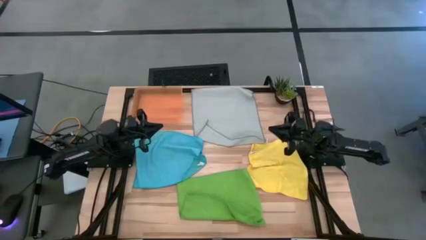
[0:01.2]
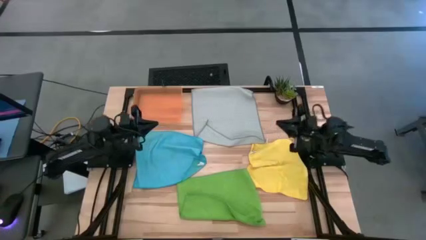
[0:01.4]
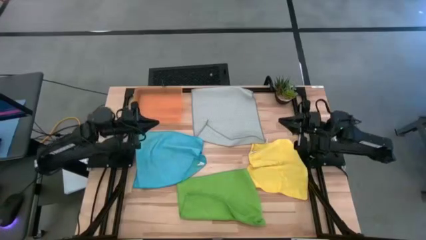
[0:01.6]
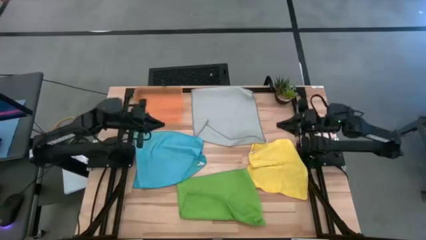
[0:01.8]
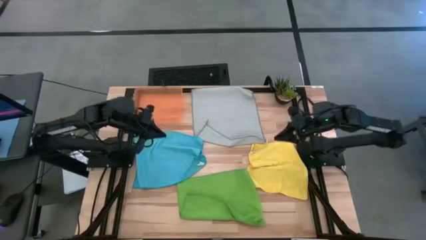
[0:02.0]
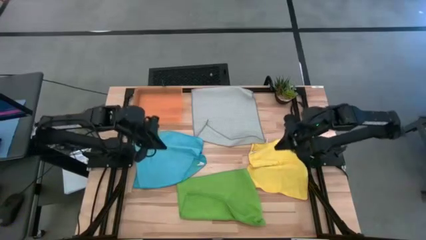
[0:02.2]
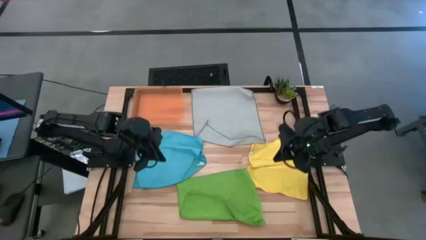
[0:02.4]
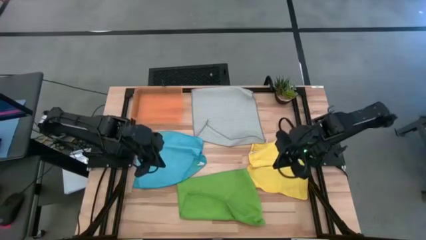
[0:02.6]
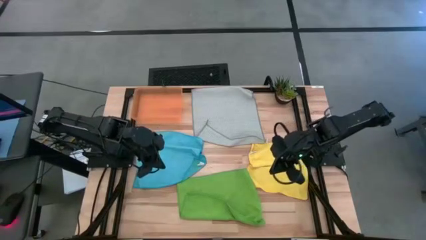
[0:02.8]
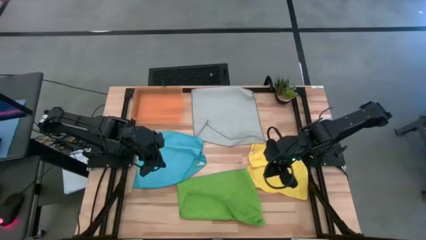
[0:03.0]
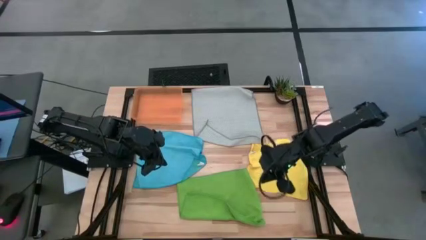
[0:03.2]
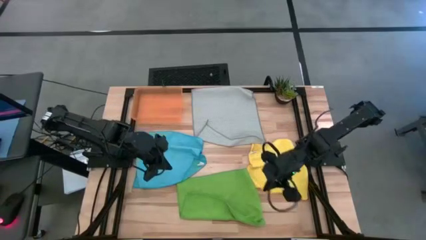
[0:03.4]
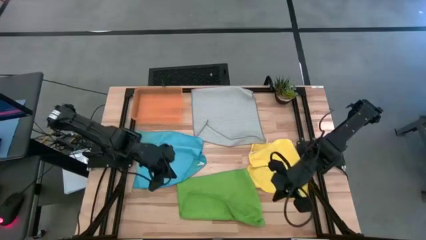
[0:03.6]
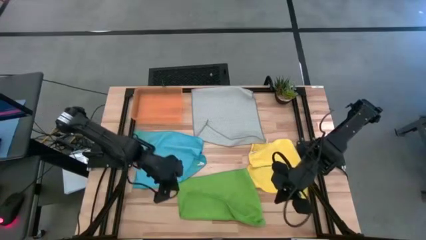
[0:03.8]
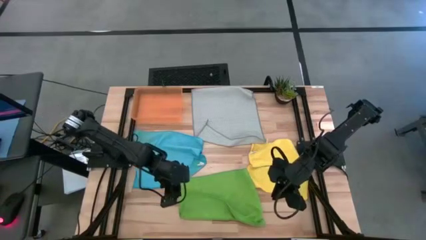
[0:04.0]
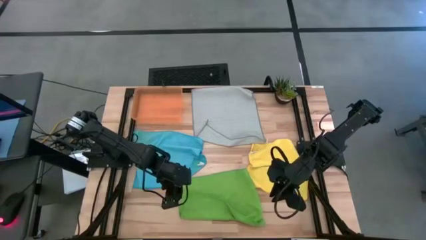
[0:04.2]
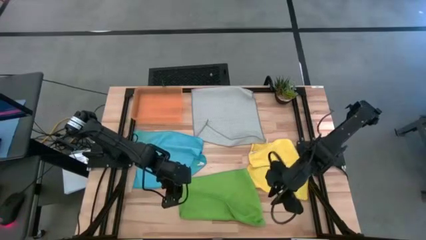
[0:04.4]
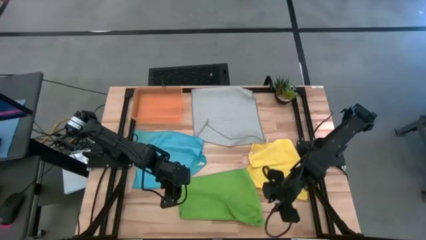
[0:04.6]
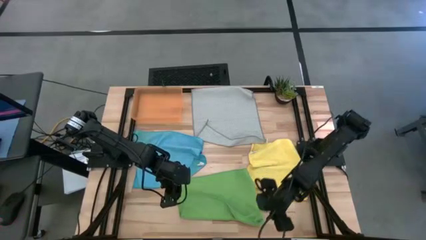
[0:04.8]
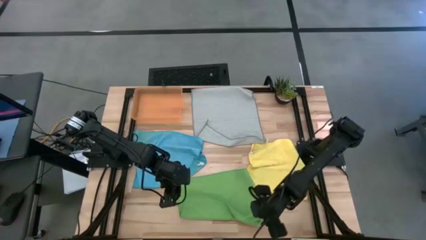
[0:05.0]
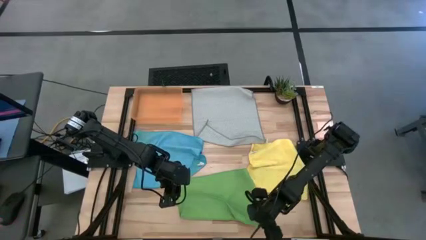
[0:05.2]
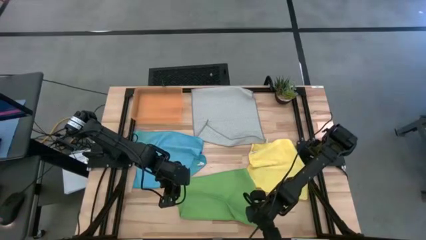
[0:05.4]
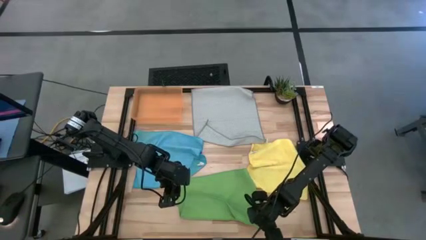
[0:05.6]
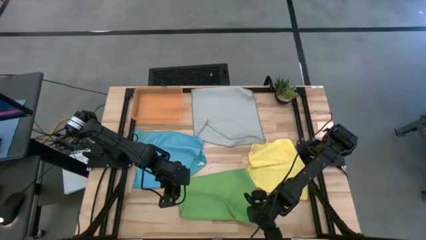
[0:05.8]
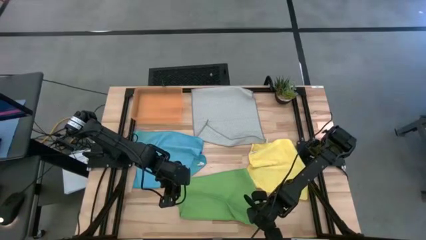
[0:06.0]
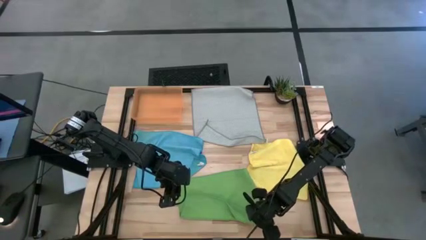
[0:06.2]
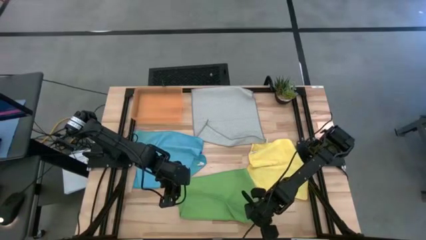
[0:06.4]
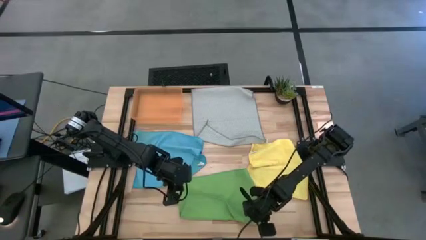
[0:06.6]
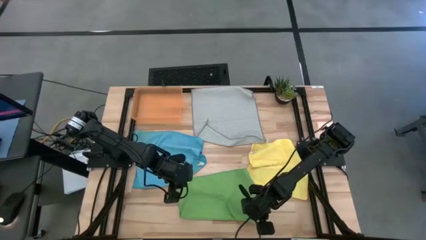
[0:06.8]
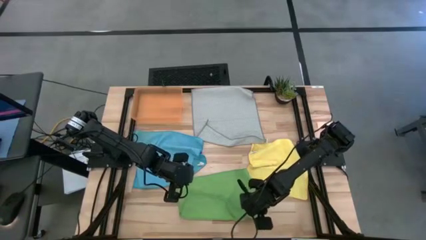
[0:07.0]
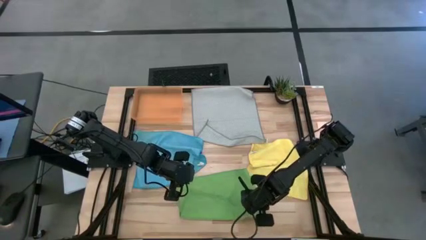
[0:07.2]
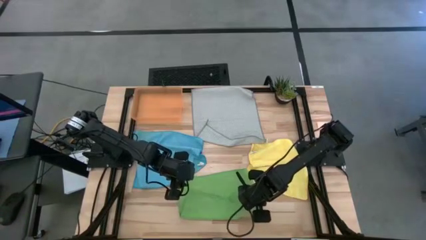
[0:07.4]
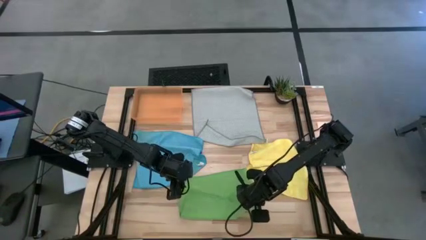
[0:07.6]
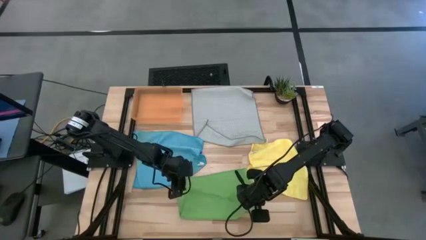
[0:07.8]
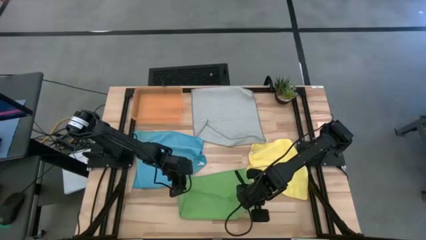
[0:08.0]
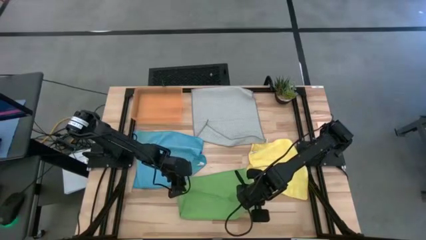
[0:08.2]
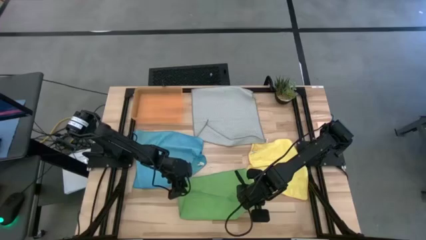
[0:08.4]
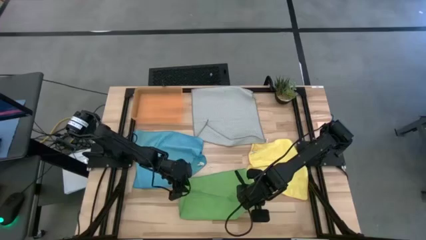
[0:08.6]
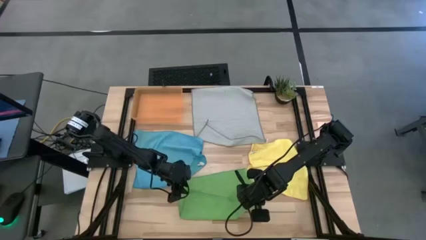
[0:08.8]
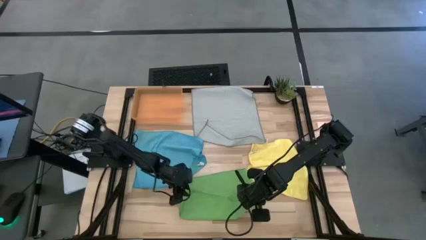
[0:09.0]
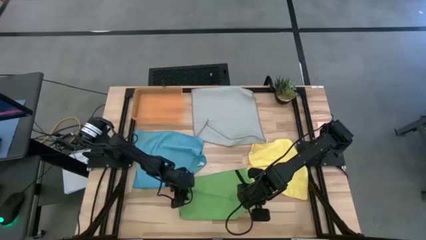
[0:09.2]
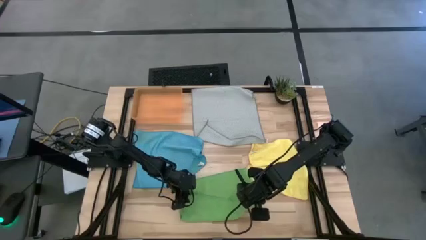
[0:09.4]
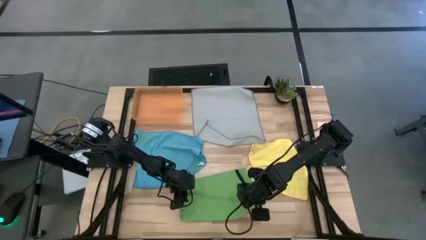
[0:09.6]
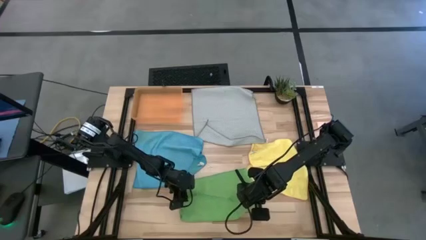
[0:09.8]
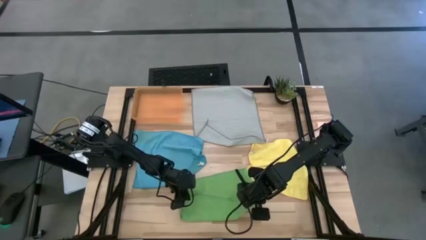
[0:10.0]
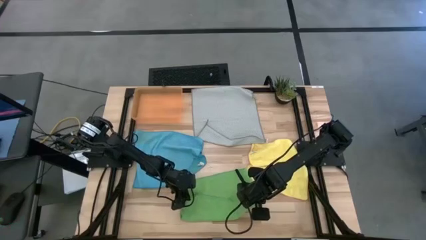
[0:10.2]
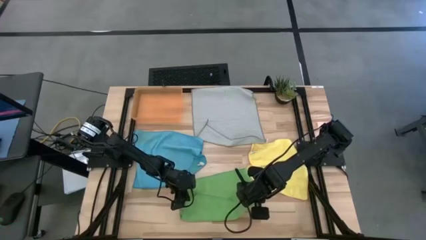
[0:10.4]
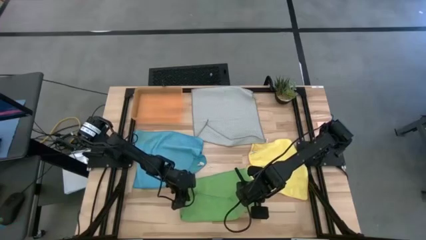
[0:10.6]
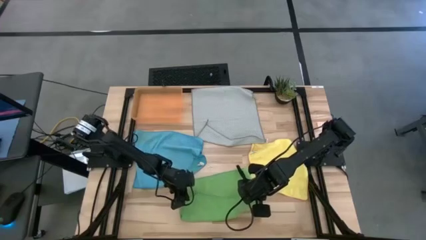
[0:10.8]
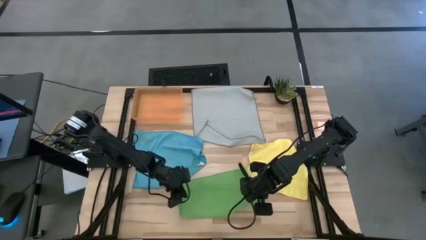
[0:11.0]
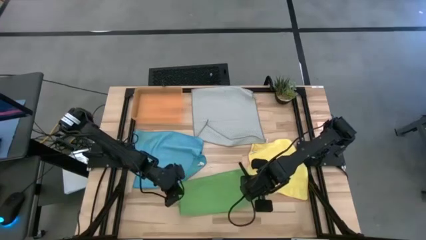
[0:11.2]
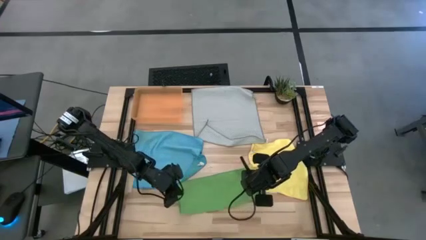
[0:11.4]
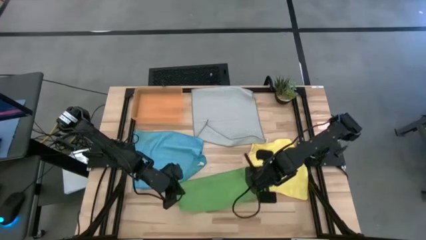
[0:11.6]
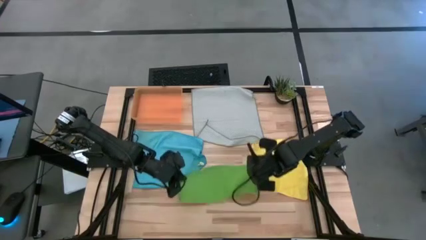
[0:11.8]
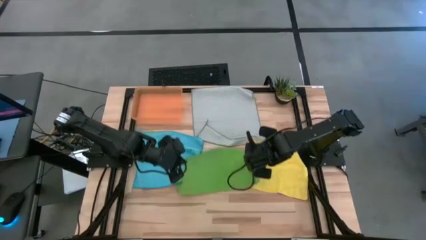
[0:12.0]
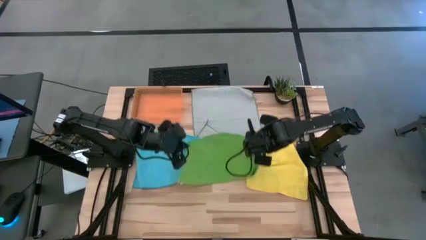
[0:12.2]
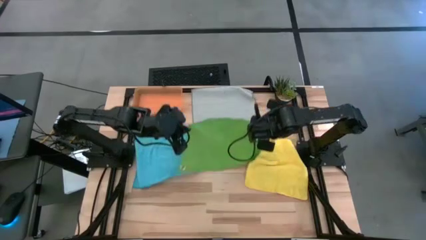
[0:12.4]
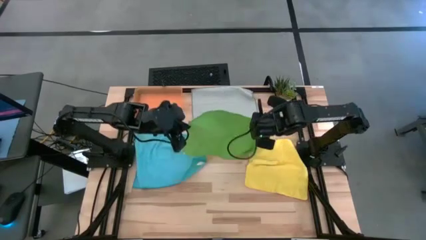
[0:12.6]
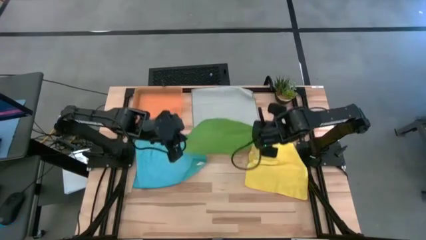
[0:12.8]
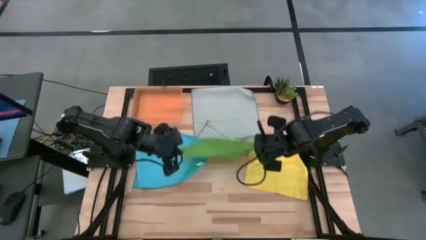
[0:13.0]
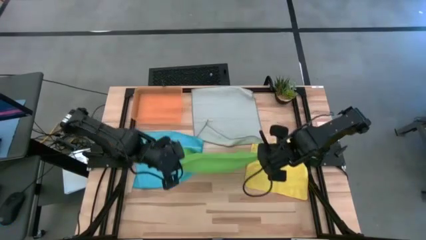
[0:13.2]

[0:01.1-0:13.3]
Task: Fold microfiber towels
Fold the green microfiber towel
